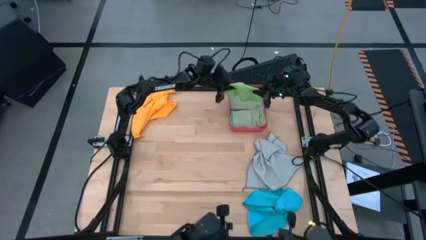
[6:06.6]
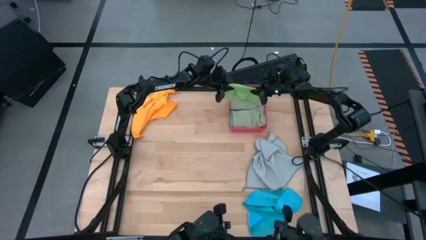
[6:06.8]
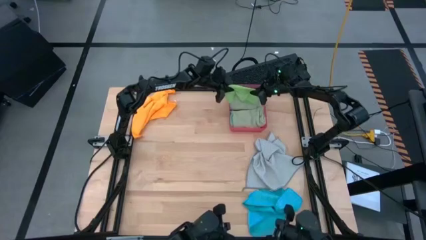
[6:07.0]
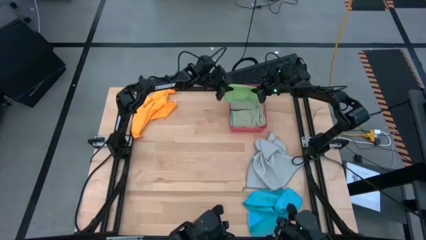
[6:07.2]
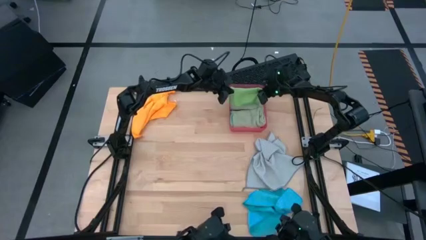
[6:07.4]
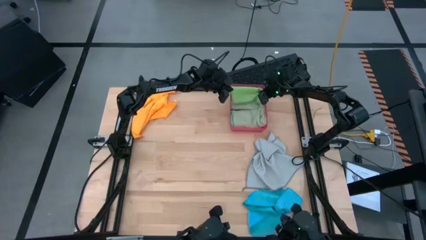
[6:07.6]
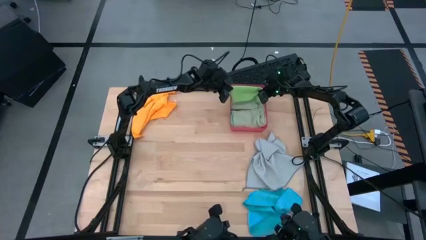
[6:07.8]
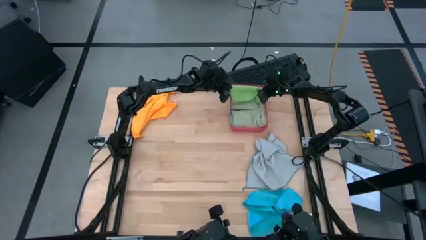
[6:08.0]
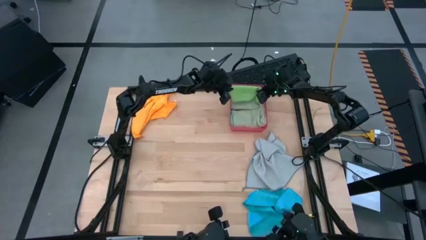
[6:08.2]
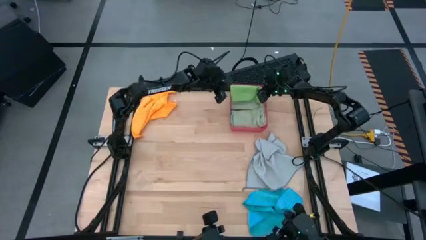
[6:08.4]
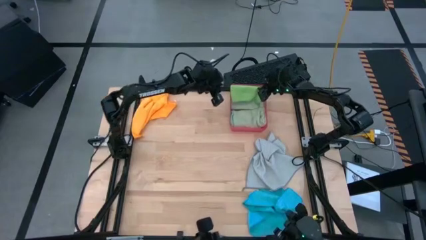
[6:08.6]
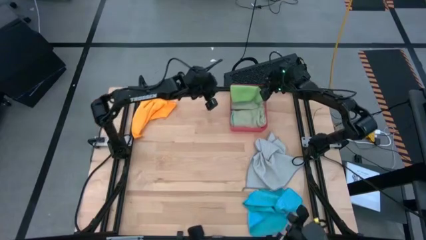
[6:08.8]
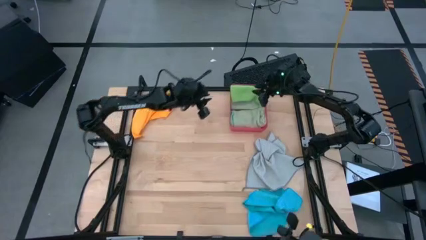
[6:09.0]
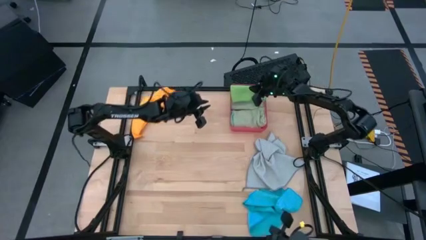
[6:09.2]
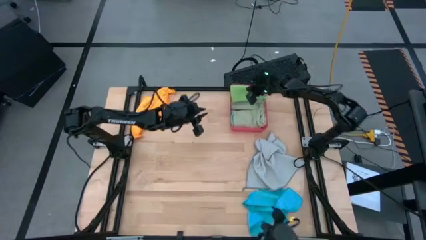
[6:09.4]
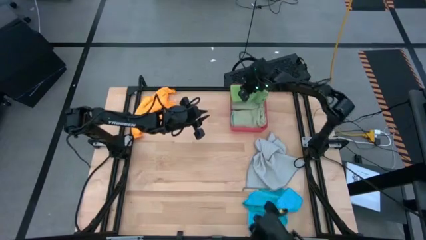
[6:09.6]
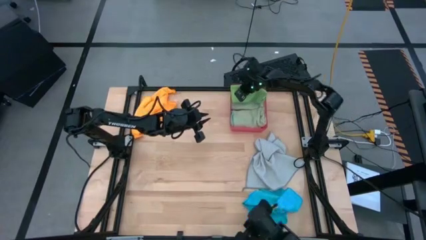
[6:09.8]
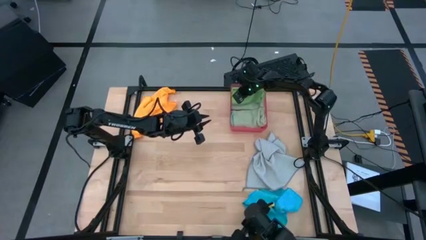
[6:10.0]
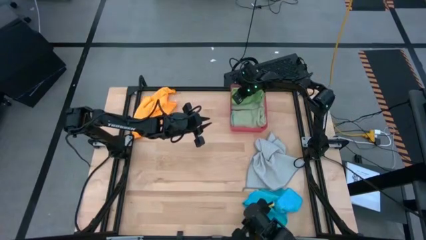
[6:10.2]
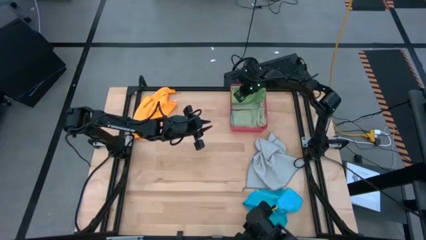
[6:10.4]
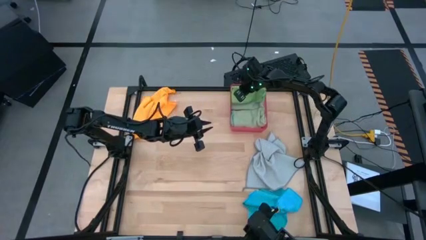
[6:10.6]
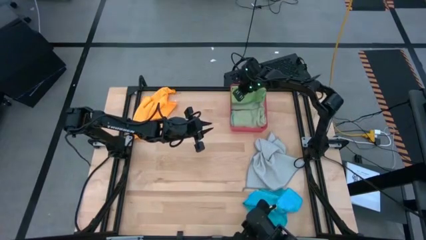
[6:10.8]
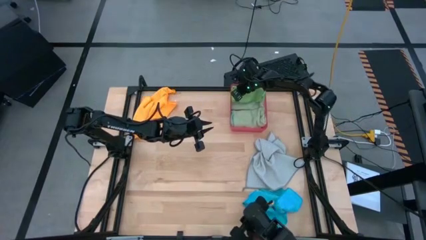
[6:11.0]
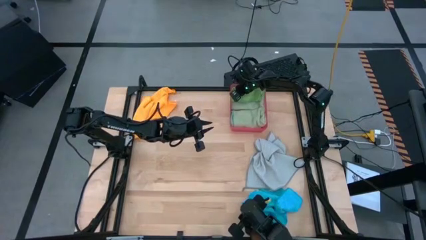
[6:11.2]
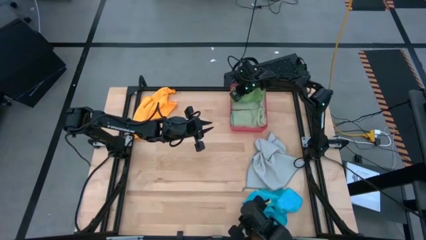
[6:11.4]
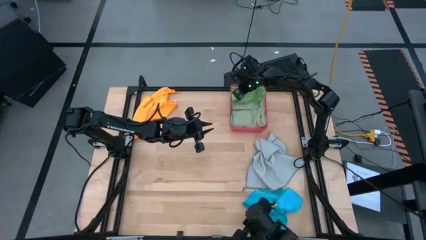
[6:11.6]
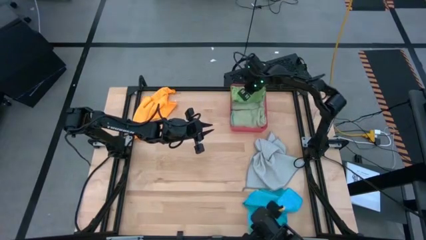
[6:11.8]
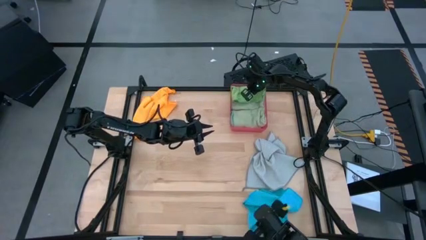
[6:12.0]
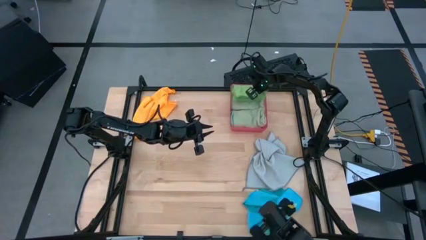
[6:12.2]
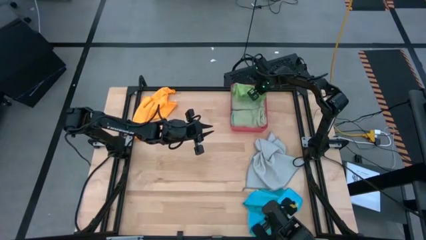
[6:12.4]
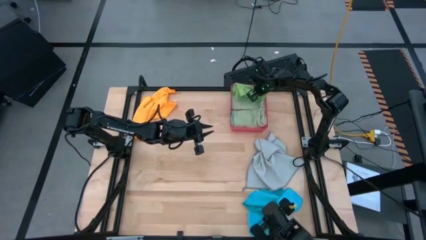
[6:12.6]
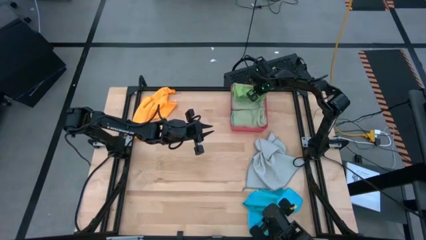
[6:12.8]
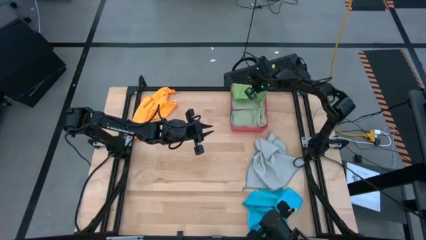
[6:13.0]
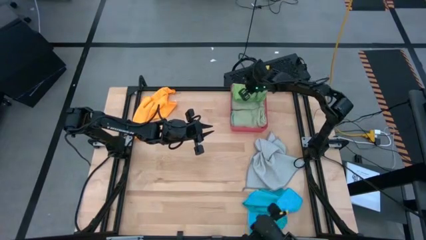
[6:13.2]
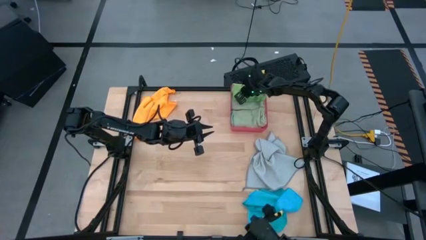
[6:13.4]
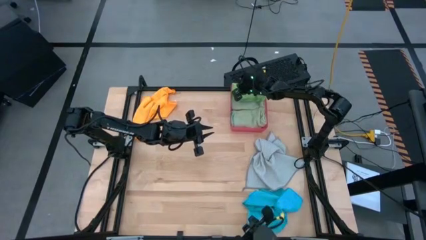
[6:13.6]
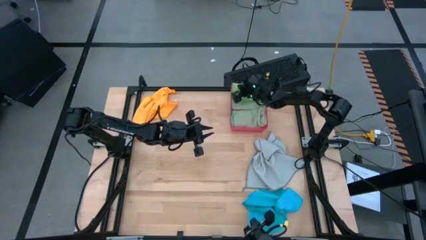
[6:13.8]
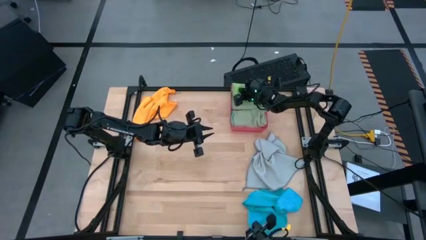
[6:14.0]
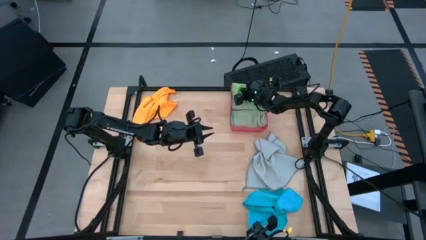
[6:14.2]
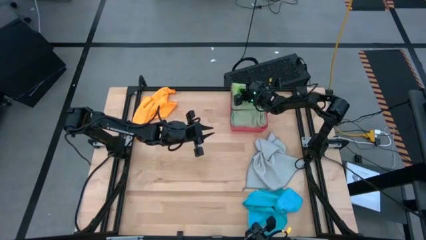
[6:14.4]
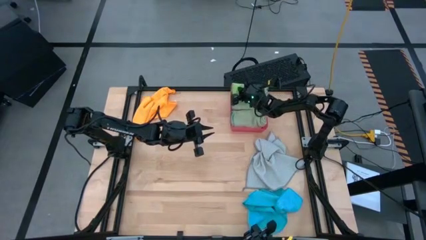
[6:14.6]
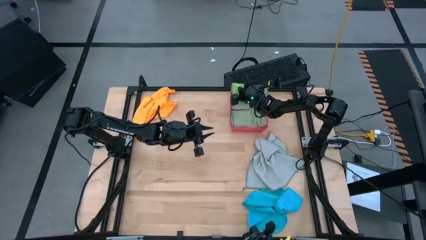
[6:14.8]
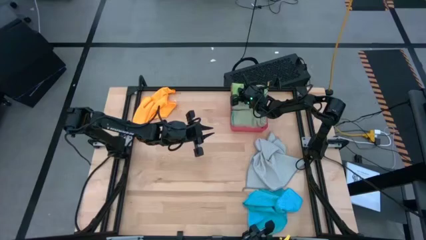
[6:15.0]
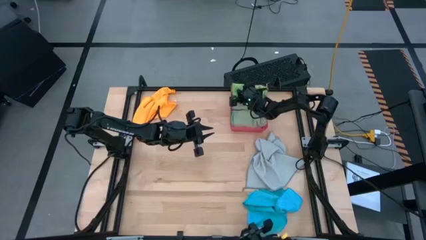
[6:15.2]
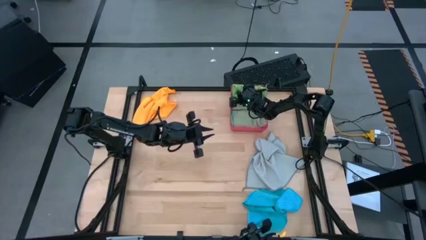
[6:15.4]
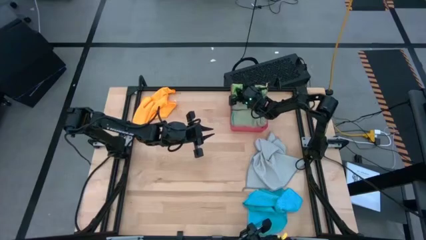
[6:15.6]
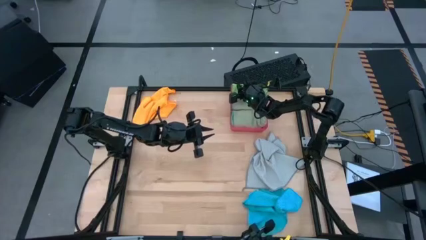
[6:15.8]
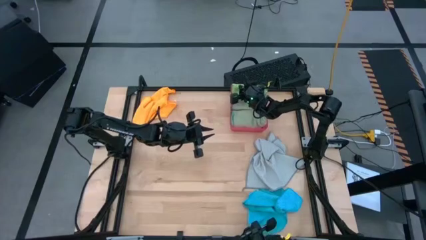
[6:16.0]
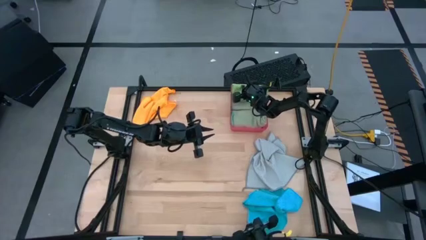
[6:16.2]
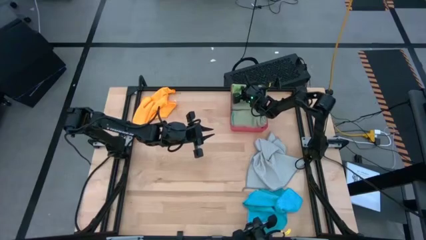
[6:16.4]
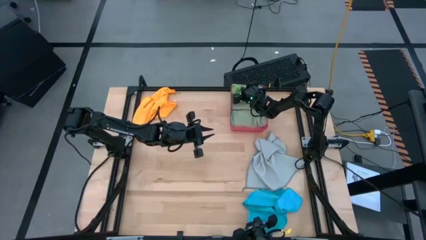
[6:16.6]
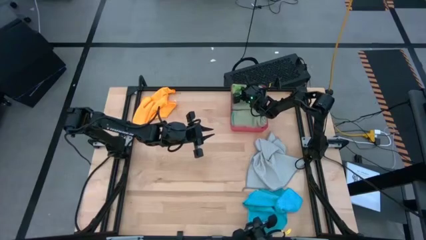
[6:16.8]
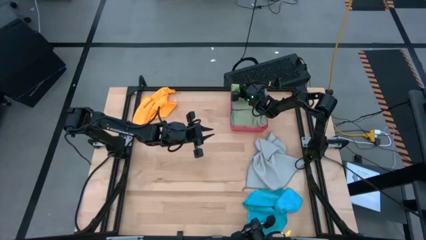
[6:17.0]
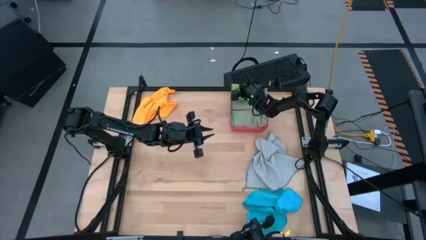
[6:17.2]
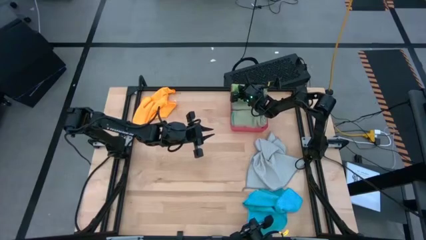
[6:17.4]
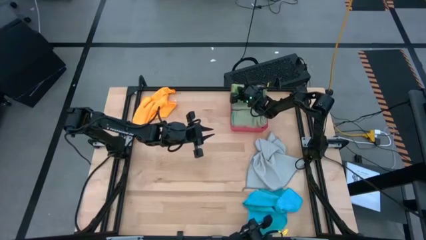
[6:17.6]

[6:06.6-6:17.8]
Task: Fold microfiber towels
Stack the dark green microfiber cloth on the top light green microfiber cloth in the red bin

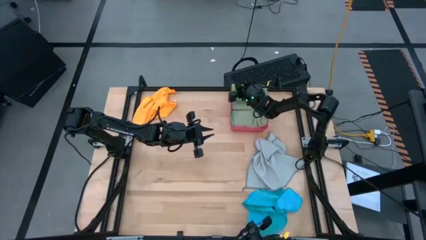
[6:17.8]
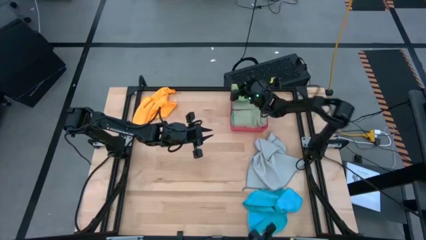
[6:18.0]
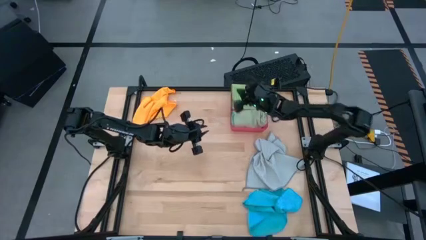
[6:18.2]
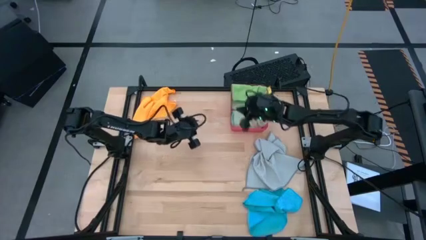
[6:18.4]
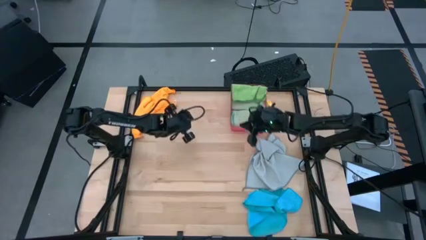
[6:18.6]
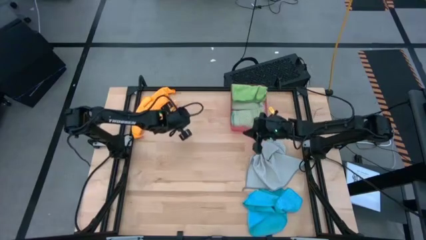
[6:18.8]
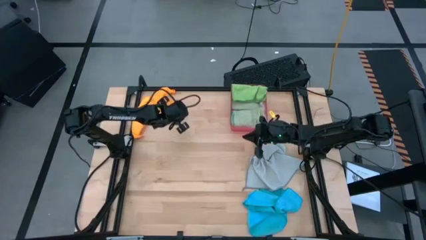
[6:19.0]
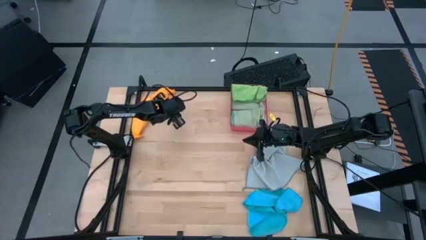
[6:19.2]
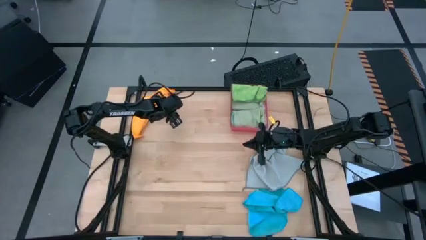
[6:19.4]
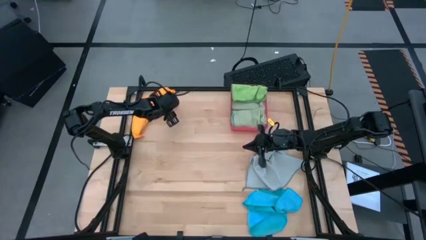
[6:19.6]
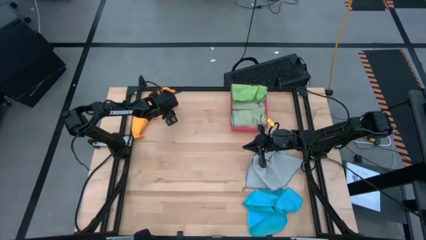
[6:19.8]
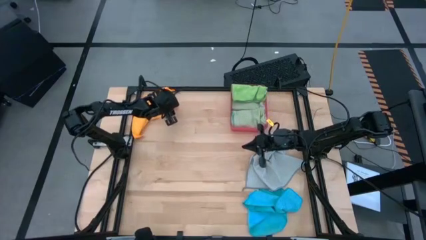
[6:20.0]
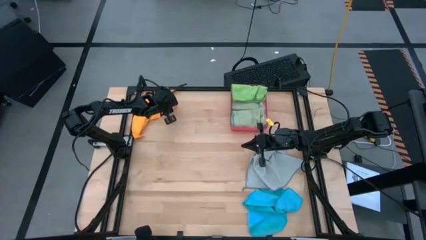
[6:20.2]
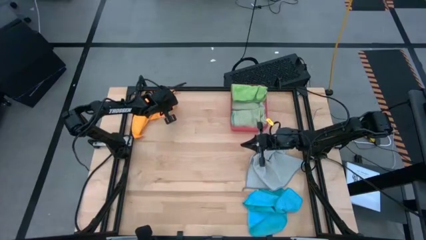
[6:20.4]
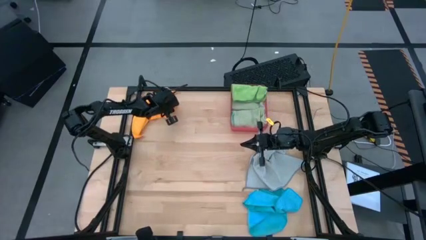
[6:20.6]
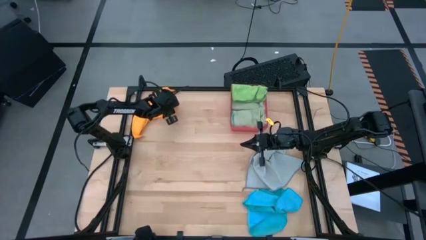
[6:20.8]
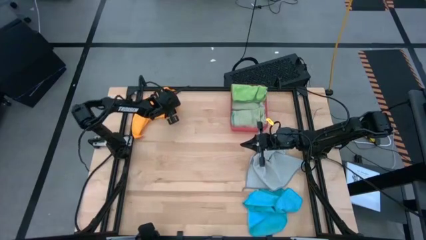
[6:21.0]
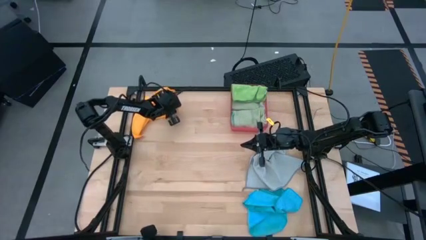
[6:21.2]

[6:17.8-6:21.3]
Fold the yellow microfiber cloth

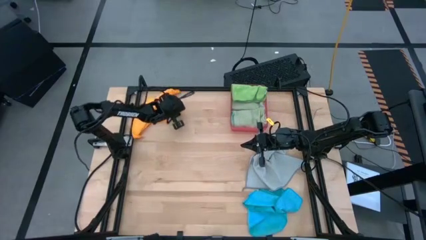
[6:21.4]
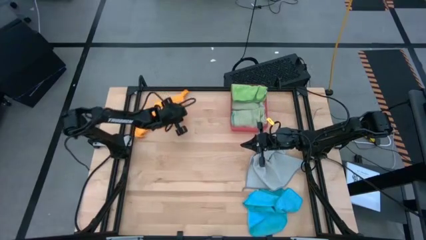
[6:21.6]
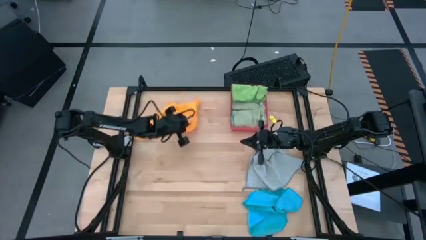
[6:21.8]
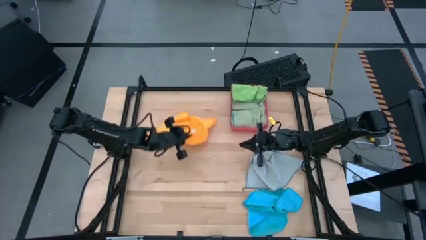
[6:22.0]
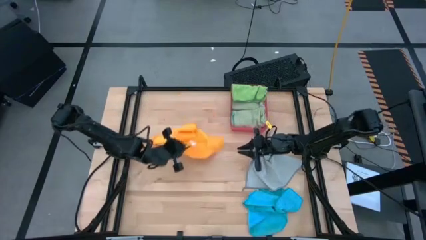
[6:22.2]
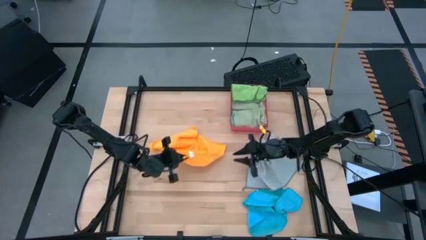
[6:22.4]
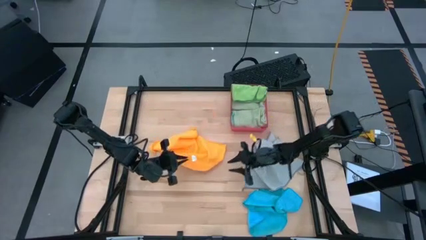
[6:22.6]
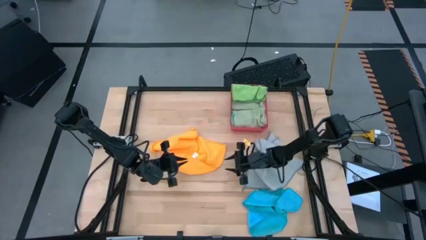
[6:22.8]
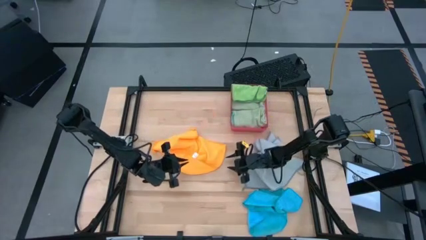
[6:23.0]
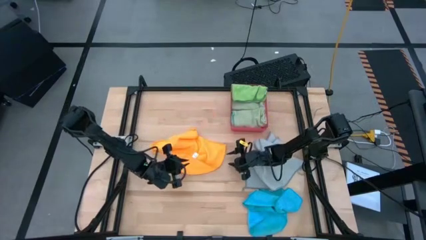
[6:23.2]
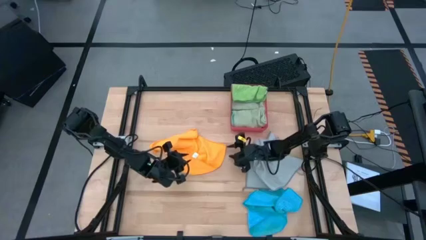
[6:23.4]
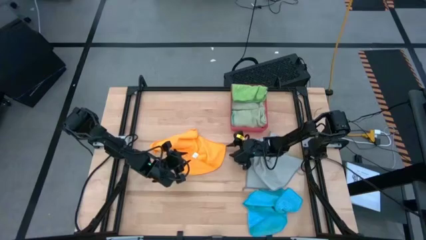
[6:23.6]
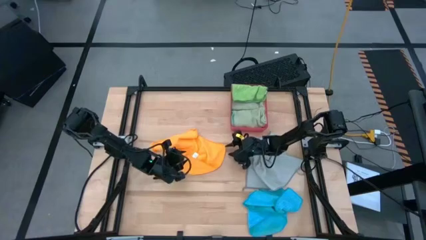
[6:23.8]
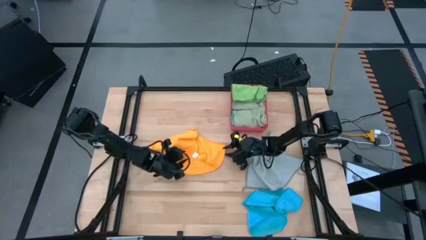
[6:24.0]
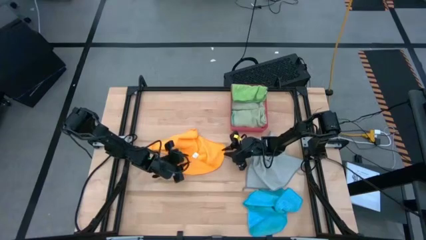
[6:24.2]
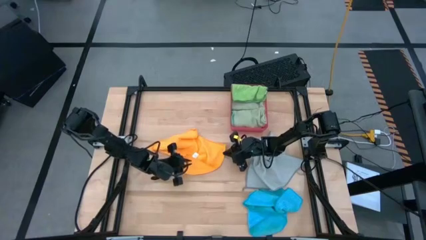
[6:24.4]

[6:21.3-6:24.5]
Fold the yellow microfiber cloth
